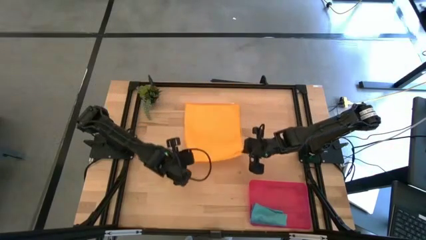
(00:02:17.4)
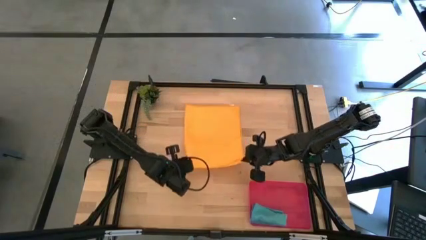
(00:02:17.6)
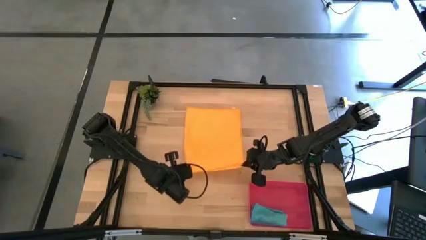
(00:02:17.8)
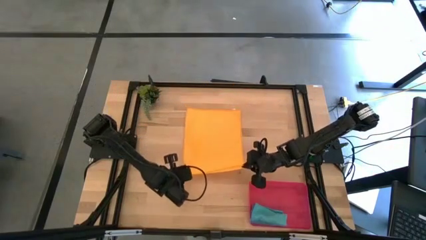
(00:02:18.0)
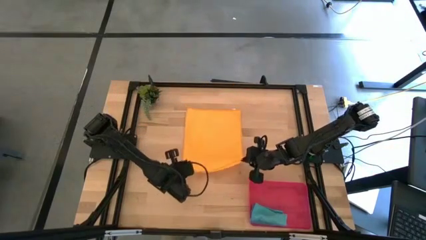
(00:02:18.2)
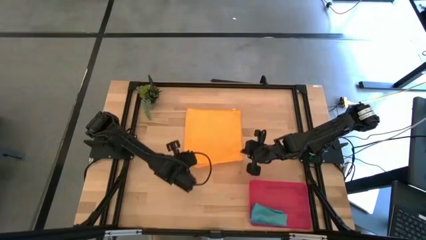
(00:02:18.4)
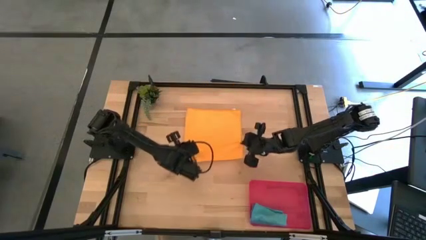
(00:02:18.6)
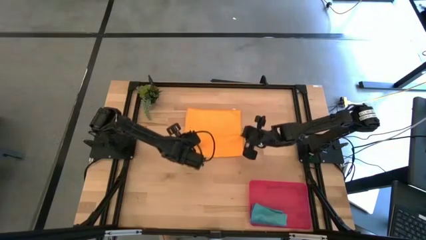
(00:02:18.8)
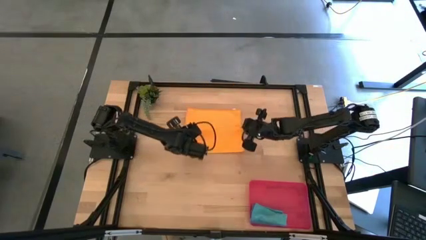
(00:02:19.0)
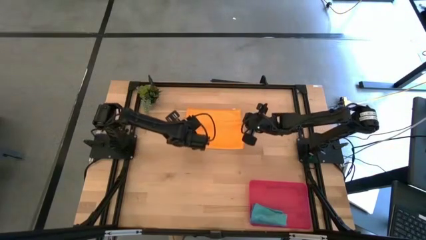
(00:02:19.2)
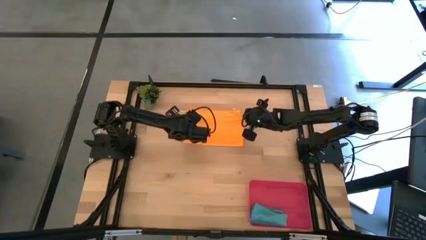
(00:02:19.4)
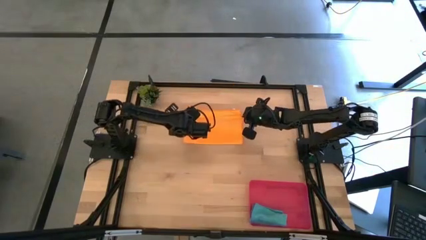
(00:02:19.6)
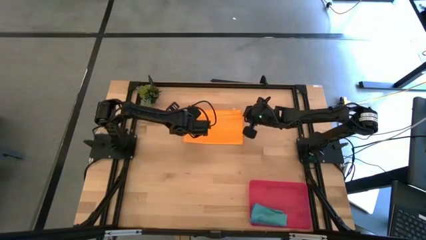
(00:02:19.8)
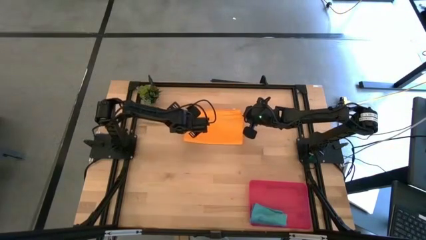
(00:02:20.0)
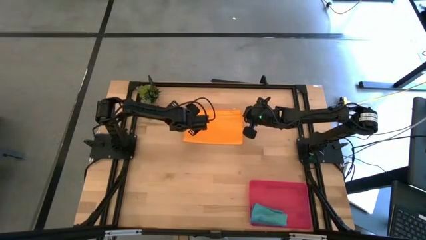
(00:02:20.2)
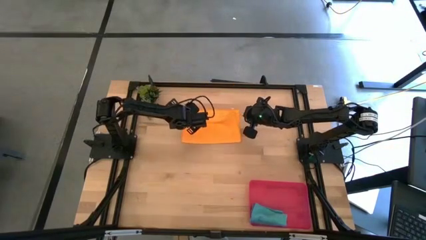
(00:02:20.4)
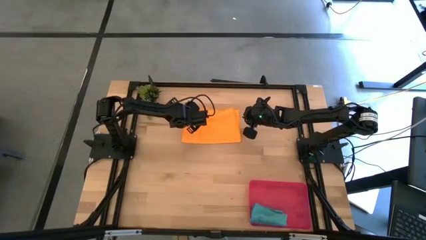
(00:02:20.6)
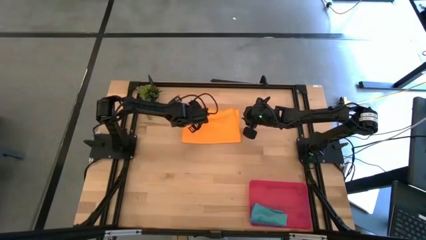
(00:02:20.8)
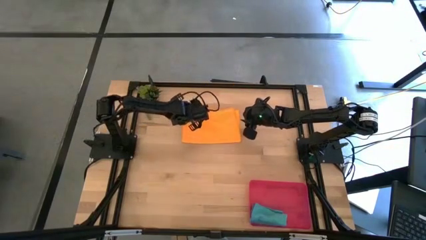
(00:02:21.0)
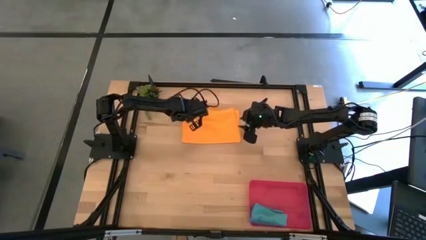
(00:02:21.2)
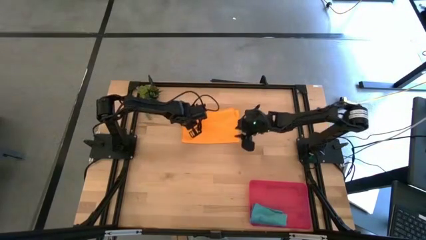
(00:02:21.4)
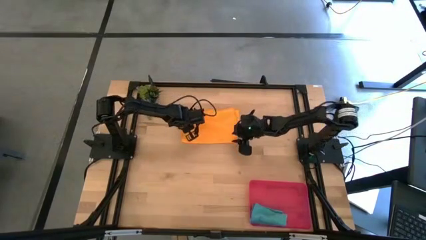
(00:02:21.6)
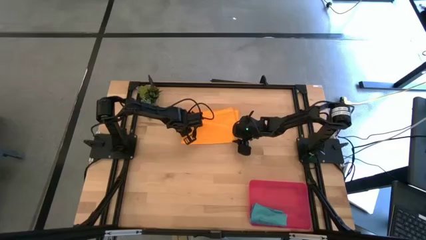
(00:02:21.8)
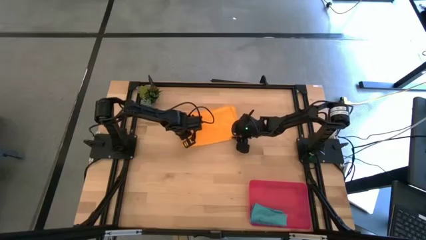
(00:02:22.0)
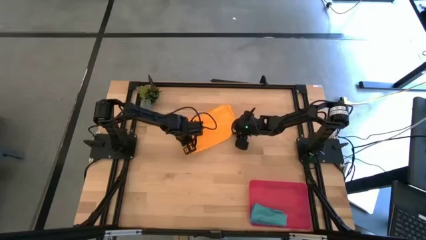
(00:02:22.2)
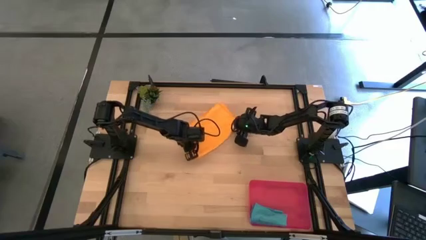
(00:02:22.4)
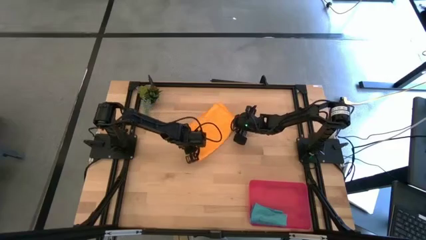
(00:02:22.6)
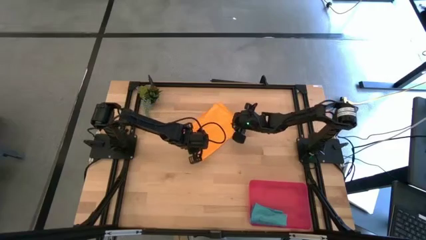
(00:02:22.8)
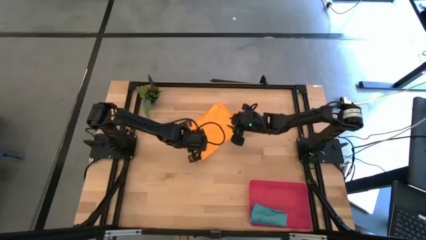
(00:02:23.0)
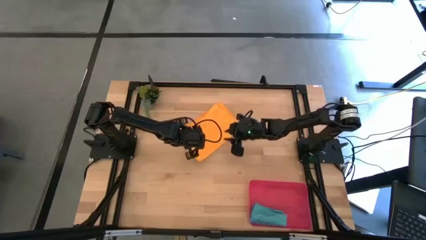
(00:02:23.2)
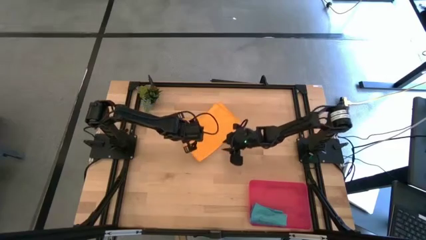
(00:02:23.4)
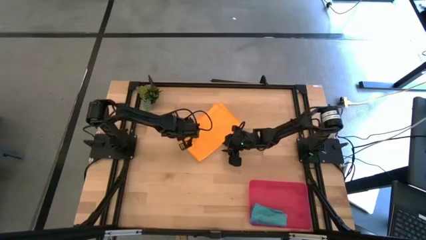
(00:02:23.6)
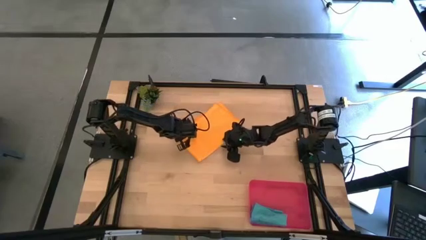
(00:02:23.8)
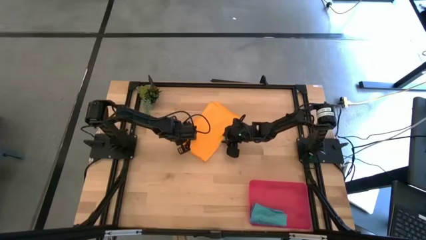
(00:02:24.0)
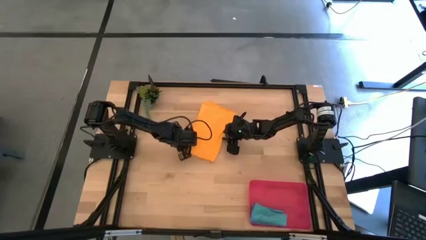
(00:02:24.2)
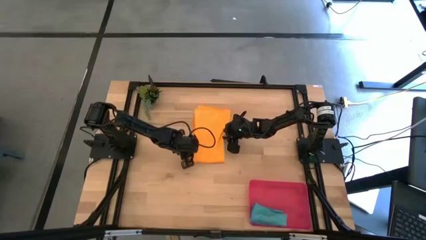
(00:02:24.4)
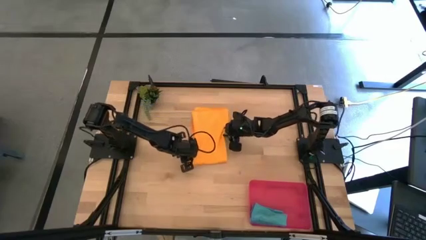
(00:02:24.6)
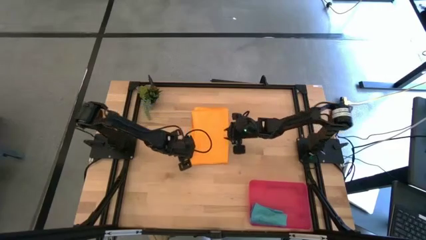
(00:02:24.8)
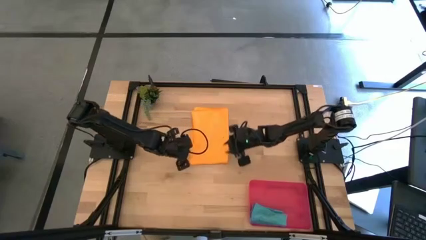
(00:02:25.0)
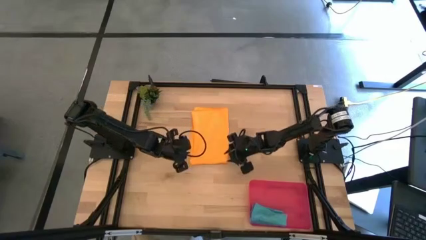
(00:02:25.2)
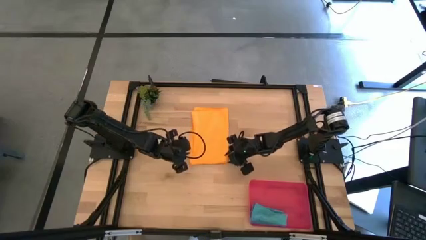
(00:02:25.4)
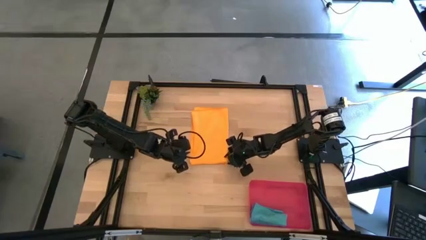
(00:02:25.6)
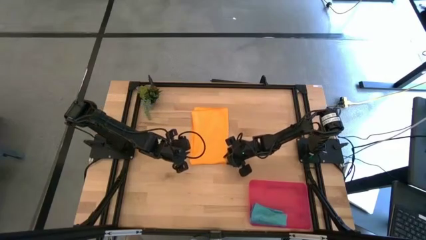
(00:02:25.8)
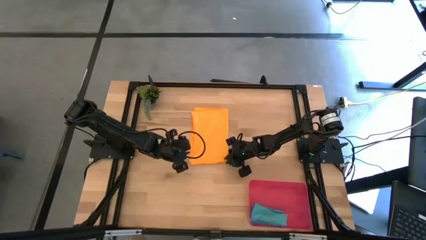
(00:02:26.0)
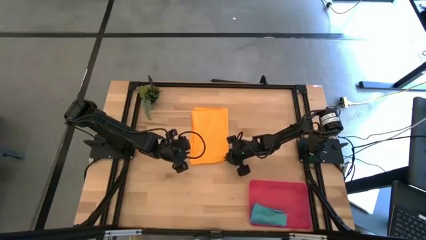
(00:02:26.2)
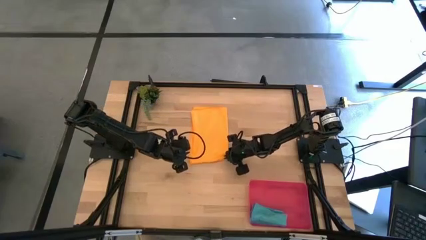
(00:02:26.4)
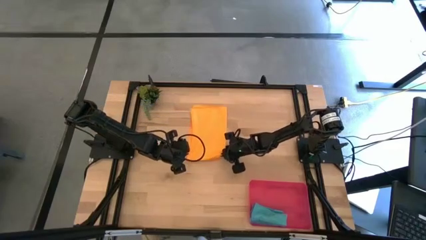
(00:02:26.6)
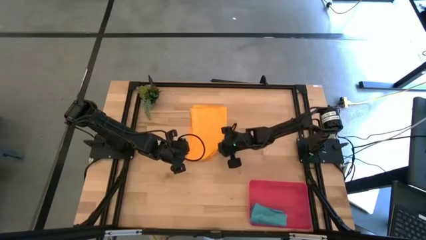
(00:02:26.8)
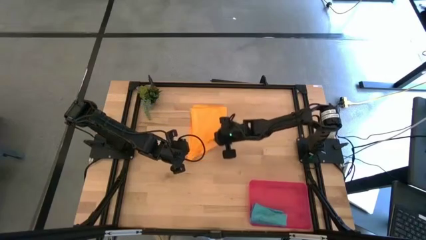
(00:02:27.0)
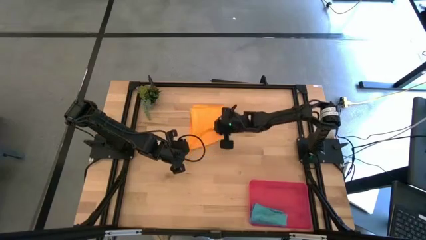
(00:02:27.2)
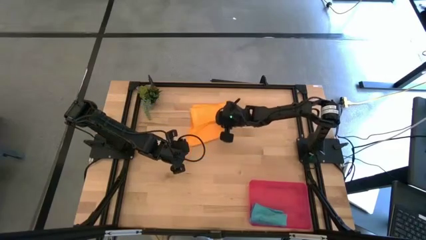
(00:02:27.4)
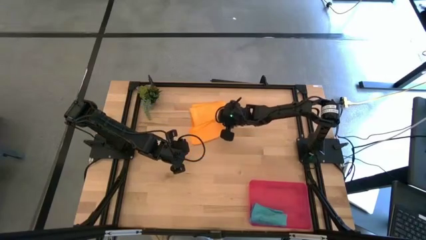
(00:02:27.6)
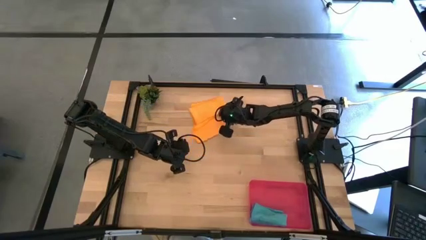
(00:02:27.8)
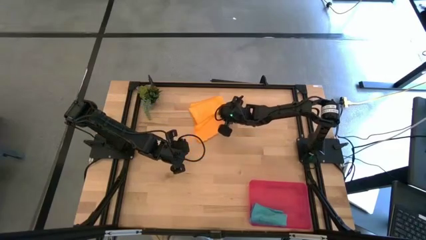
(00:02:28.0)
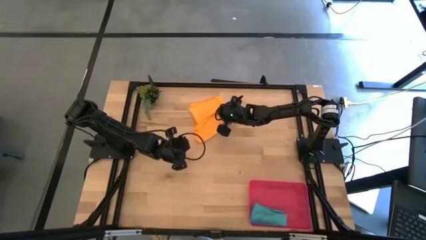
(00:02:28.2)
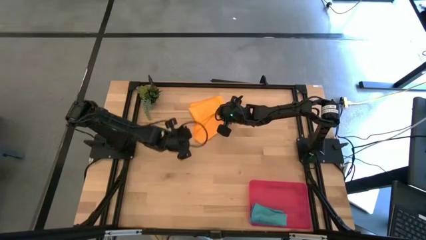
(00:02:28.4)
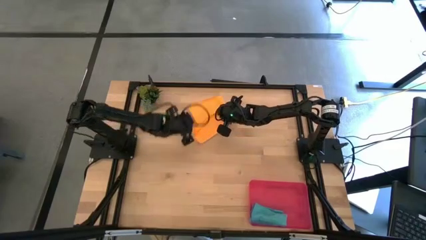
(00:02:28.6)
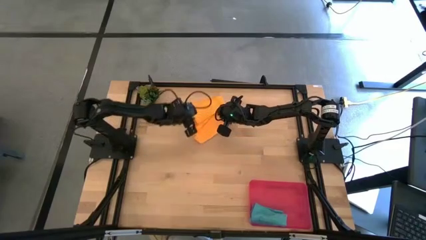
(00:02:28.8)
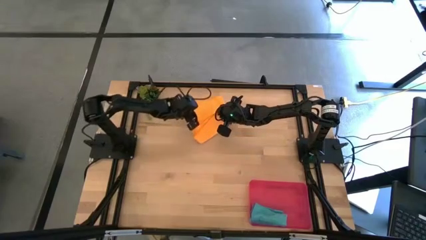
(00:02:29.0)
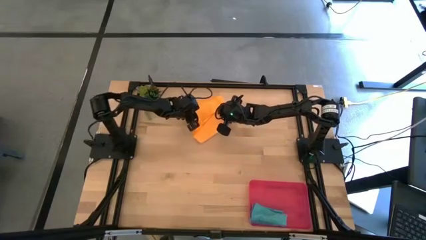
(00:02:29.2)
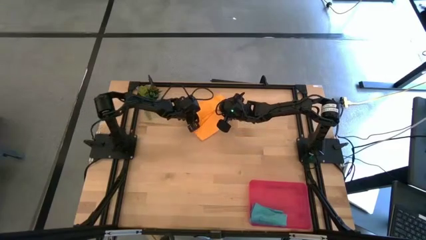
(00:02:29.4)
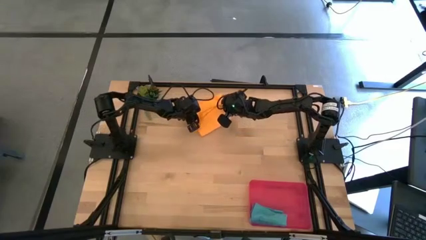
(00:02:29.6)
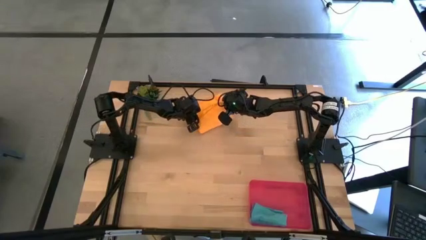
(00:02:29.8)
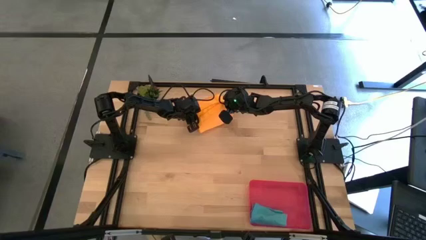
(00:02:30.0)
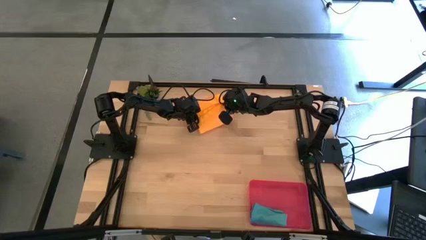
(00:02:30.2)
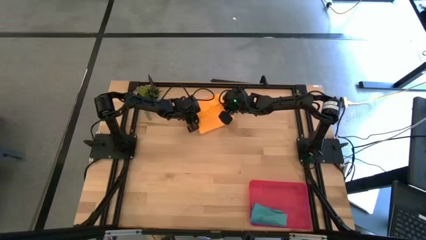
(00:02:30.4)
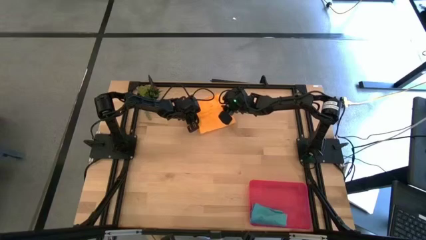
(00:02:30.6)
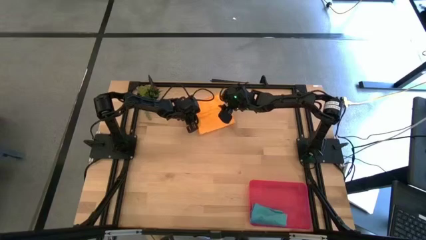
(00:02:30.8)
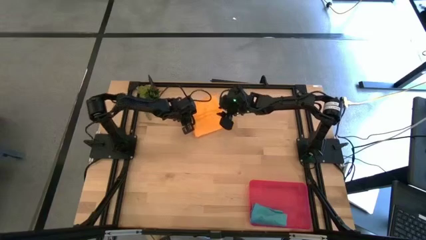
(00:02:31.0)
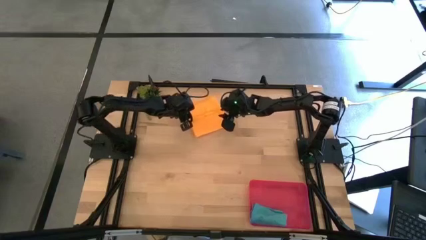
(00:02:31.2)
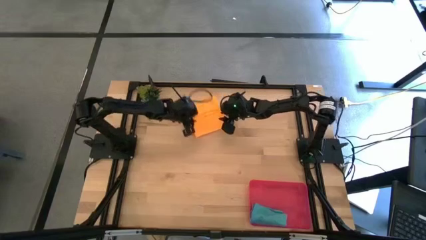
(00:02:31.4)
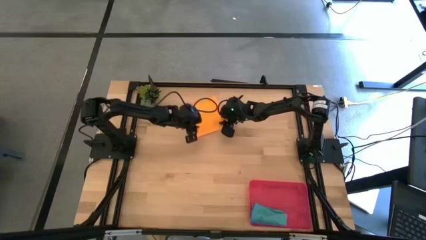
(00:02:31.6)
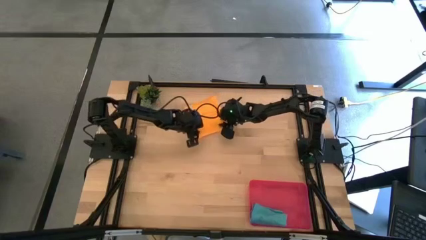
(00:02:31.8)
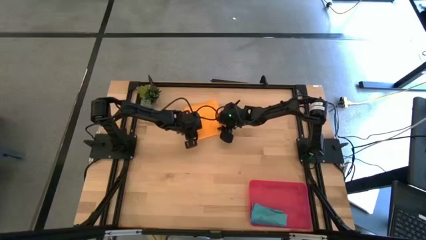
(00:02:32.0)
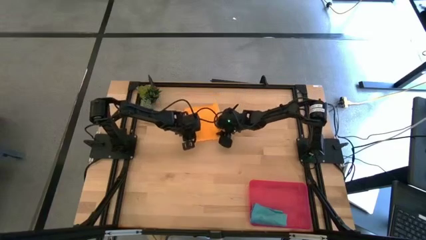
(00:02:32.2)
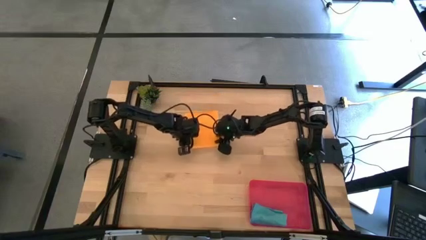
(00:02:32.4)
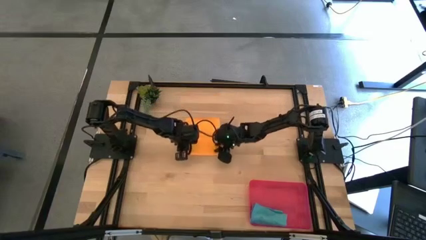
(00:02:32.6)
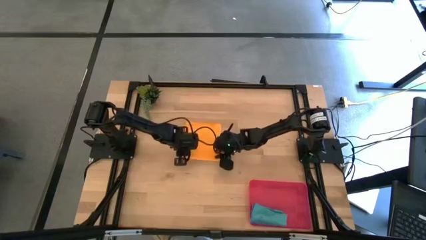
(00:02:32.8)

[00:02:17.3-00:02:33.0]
Task: Roll microfiber towels into tight, uniform cylinder then place into a basket
Fold the orange microfiber cloth
